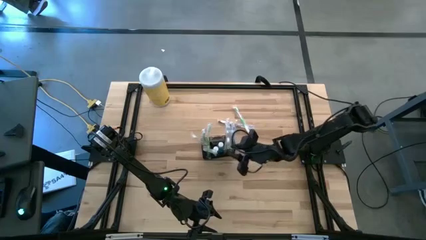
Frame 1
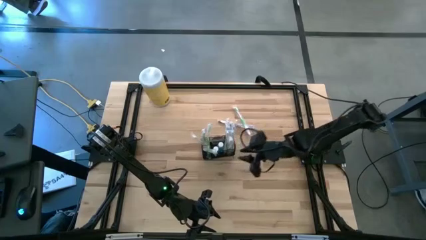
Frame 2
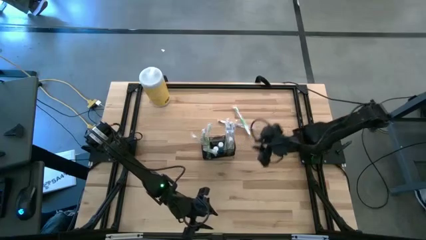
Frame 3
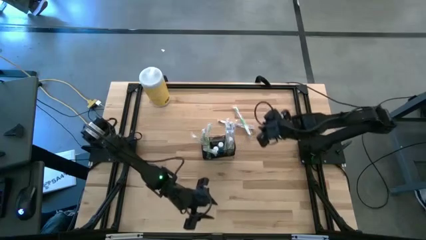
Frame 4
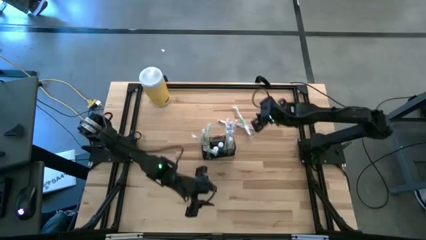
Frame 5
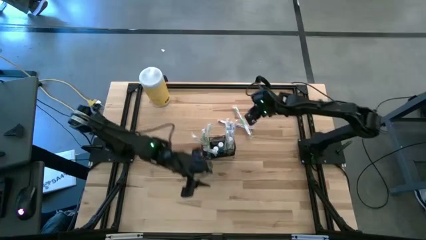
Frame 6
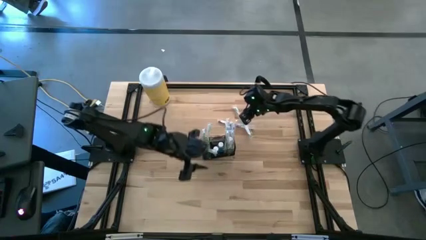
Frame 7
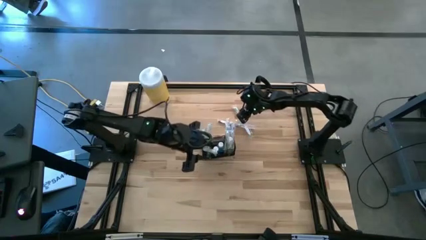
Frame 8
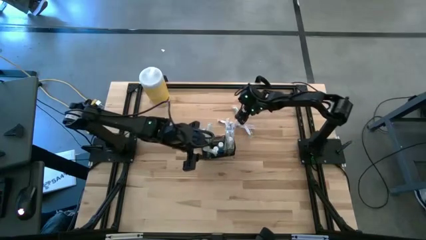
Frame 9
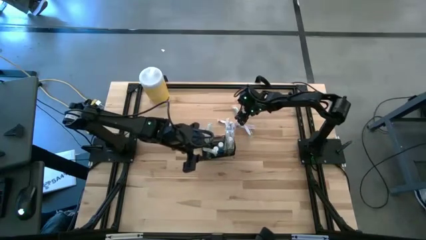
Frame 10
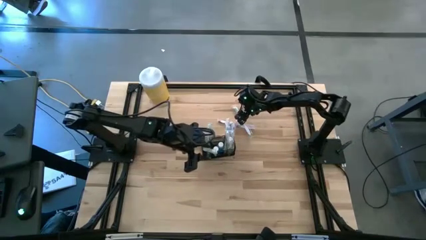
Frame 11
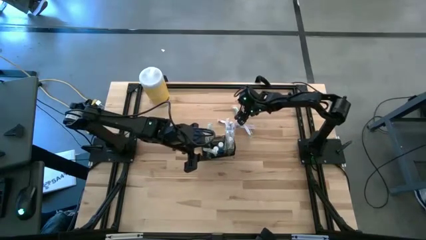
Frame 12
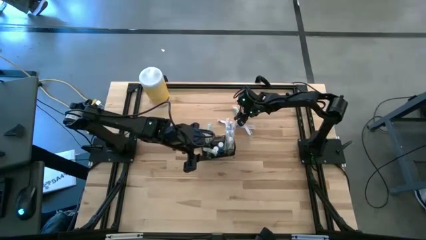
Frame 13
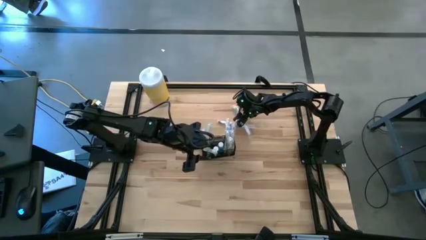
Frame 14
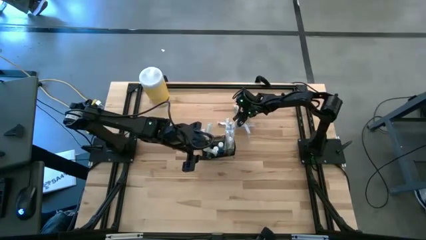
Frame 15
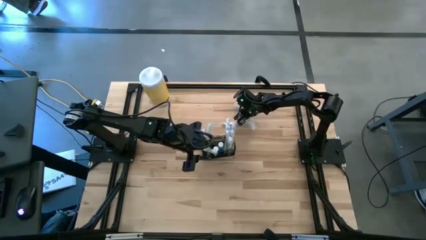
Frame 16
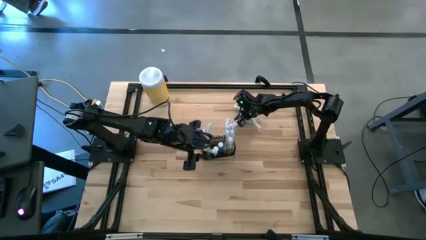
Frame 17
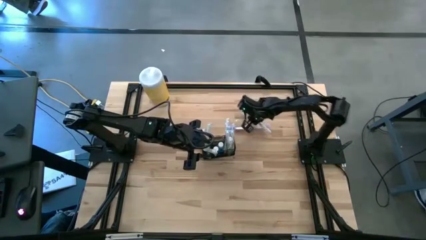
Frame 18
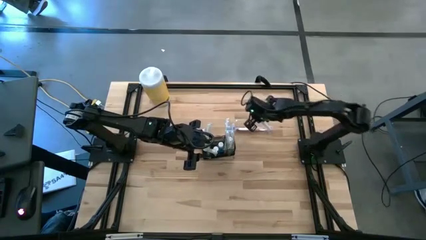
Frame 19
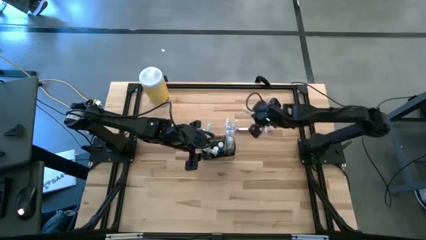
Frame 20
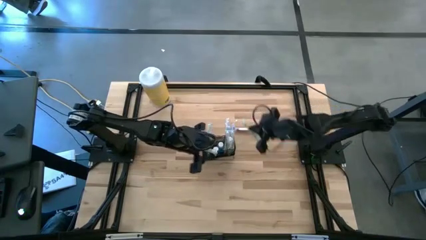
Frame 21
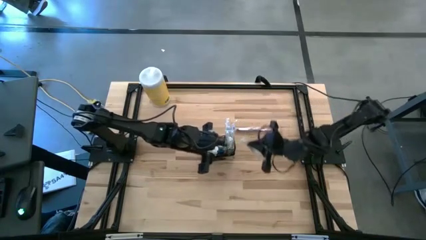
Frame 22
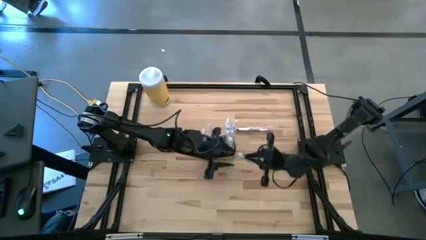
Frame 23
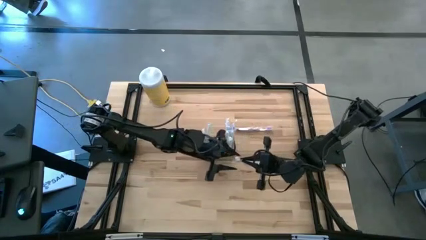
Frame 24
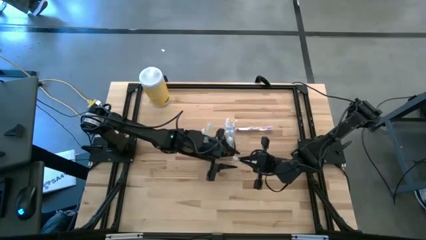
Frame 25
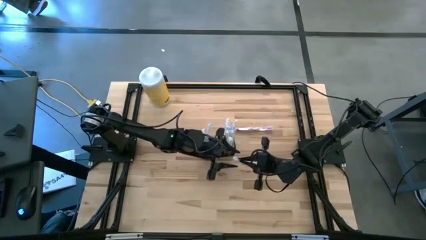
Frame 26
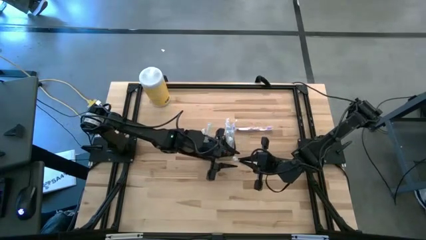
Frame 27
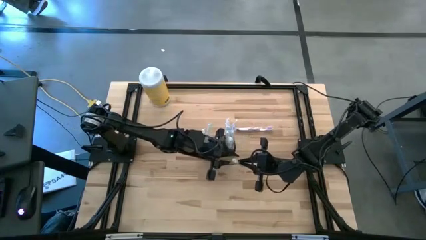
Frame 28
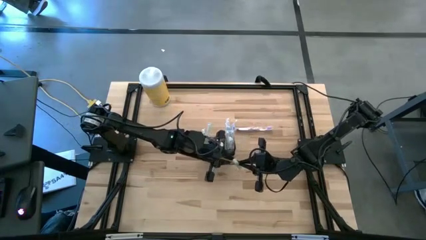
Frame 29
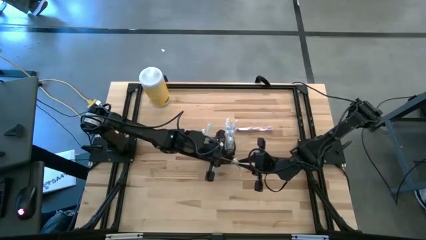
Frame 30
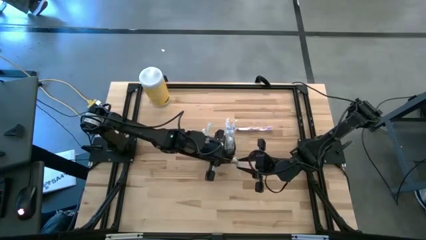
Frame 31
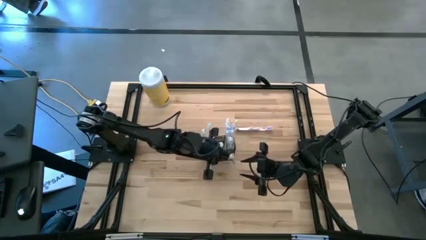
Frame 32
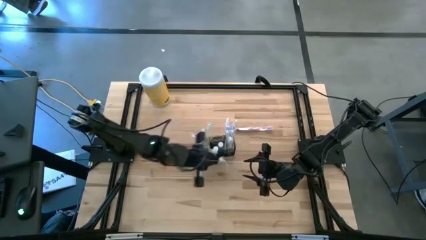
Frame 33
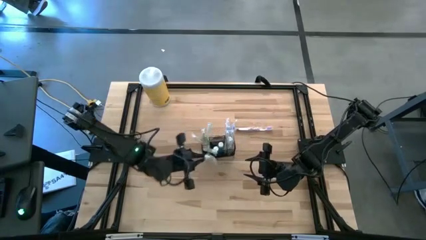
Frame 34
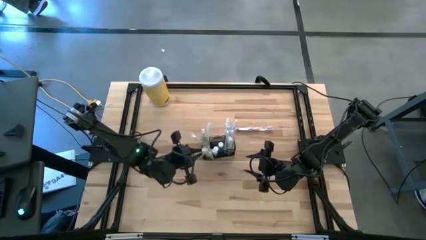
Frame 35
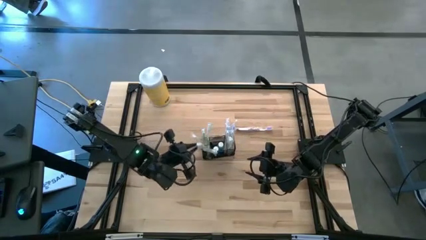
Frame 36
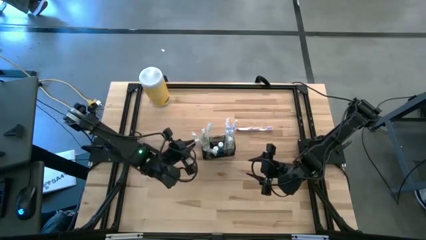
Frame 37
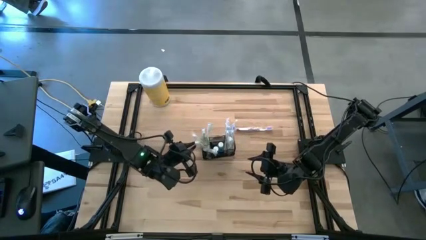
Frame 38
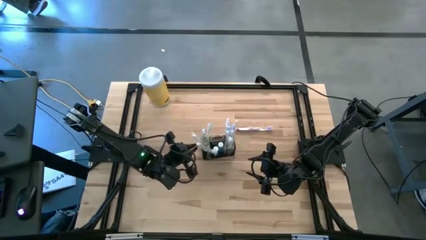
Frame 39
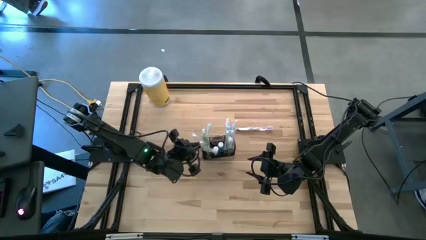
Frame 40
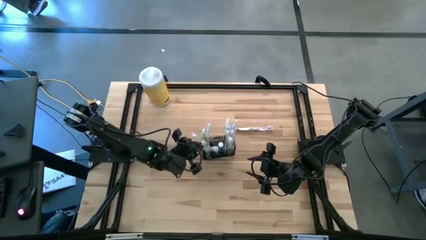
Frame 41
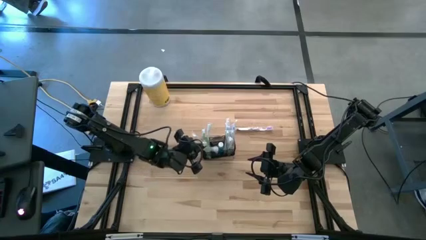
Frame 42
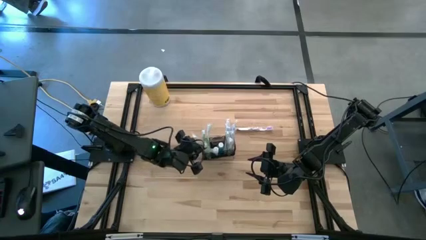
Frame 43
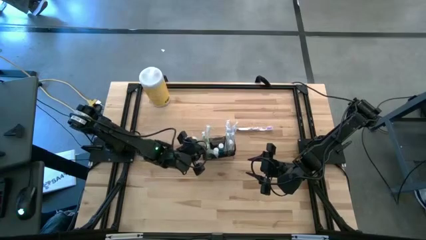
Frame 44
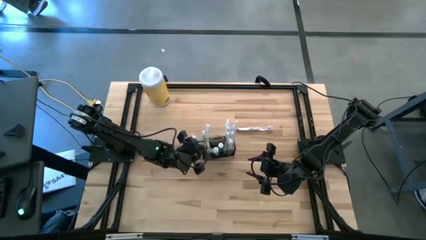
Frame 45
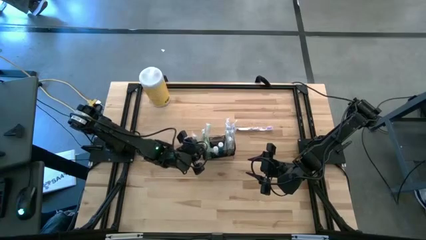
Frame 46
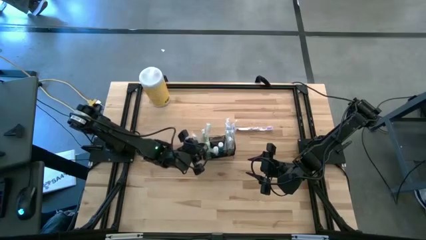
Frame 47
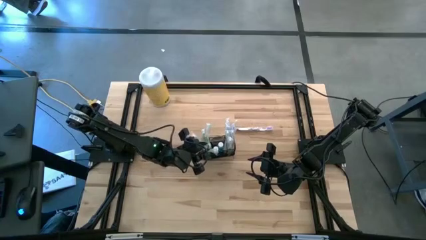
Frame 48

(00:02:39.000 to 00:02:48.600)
Task: Pick & Place toothbrushing station
Put the green toothbrush into the wire organizer

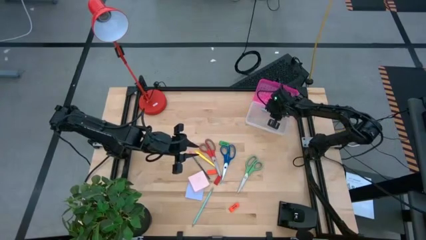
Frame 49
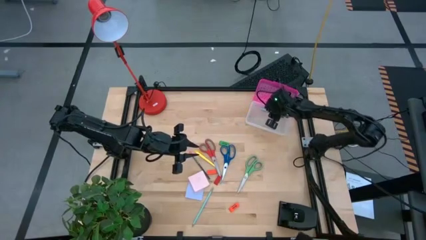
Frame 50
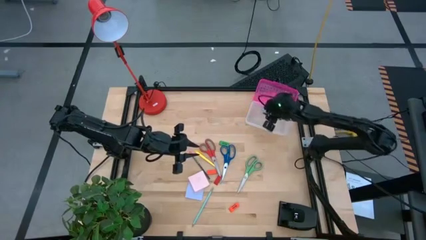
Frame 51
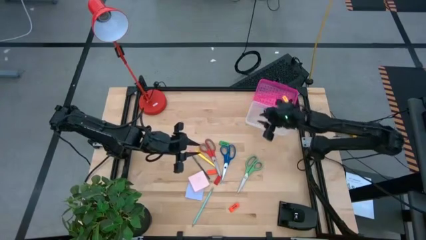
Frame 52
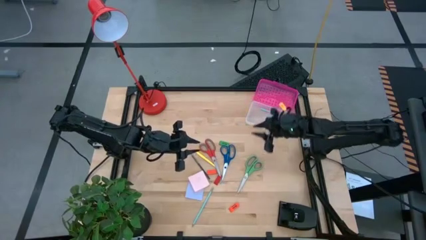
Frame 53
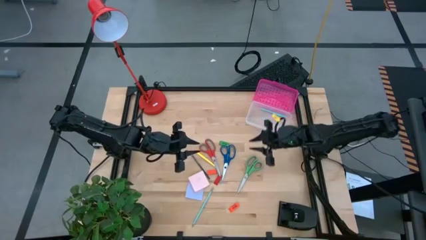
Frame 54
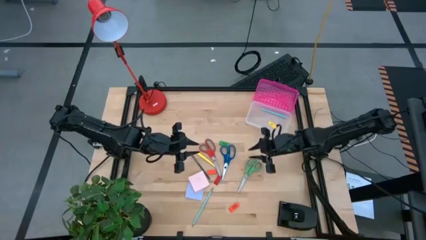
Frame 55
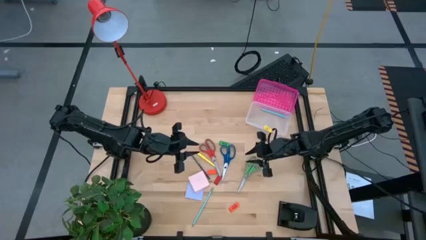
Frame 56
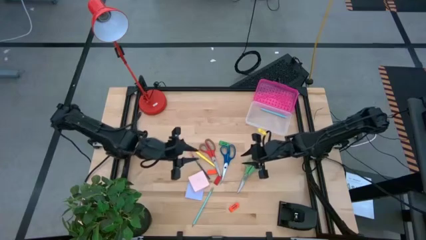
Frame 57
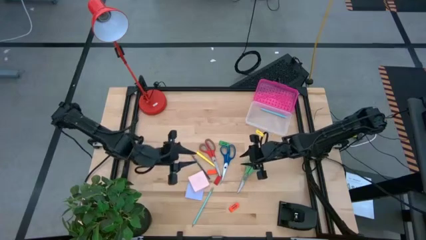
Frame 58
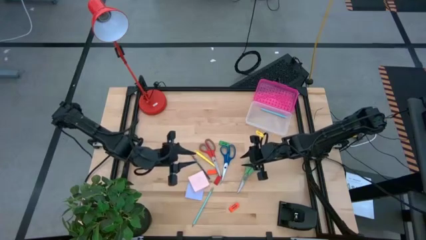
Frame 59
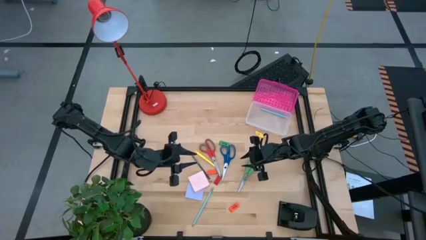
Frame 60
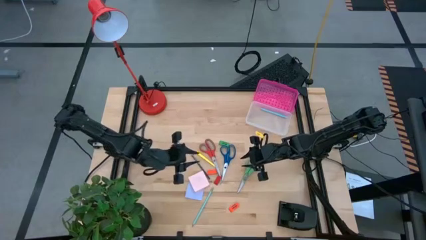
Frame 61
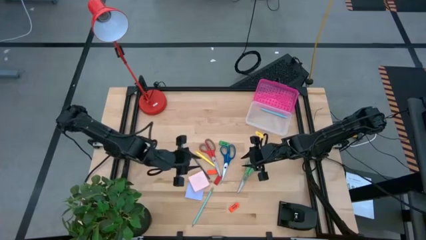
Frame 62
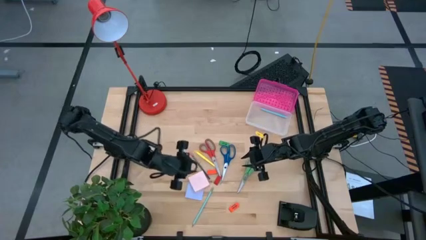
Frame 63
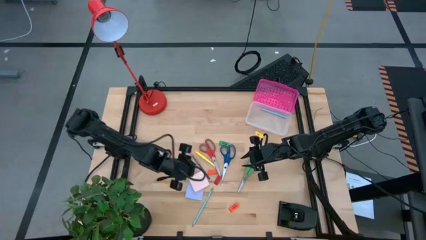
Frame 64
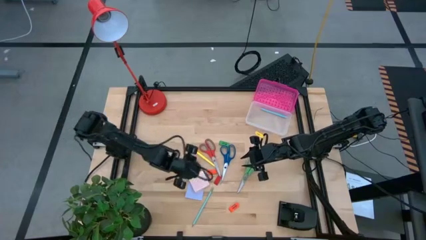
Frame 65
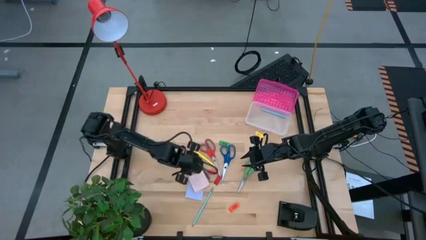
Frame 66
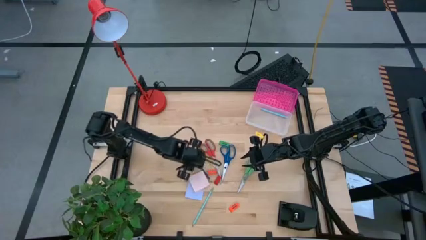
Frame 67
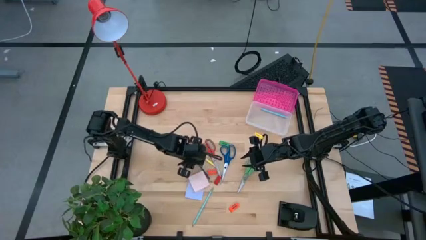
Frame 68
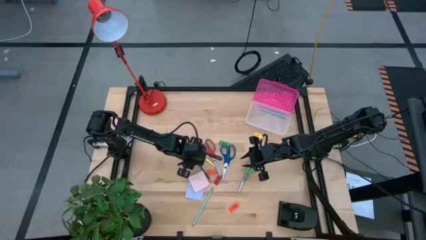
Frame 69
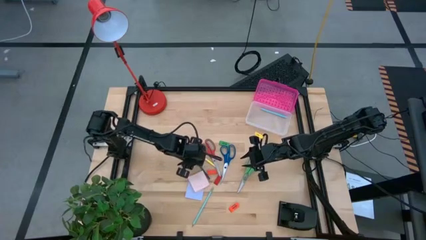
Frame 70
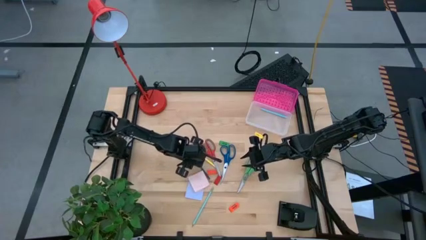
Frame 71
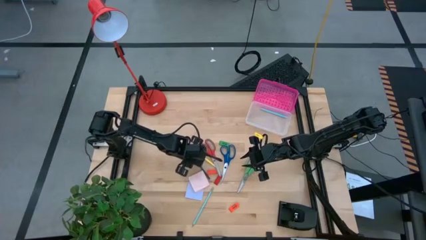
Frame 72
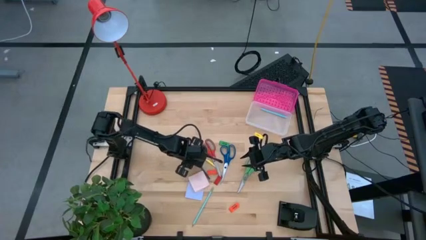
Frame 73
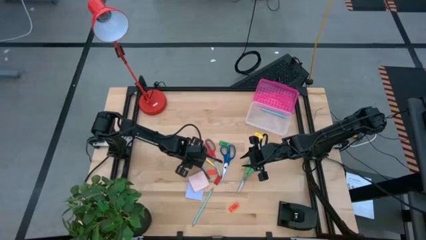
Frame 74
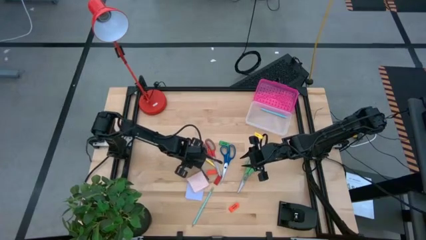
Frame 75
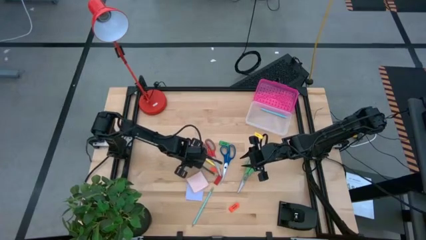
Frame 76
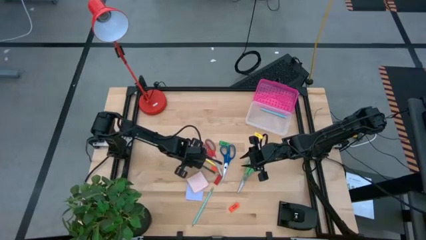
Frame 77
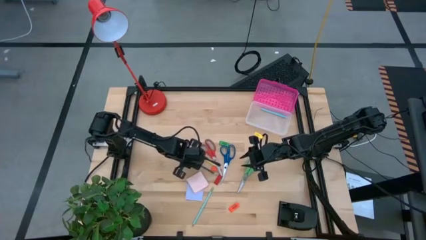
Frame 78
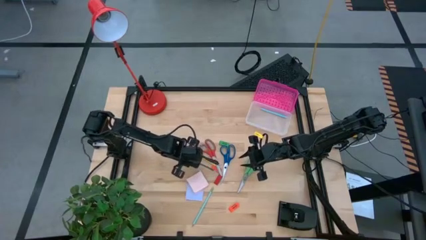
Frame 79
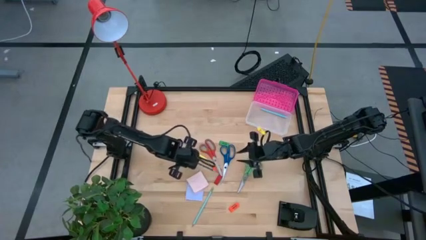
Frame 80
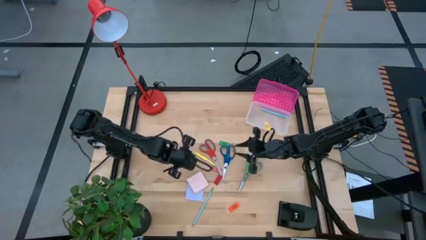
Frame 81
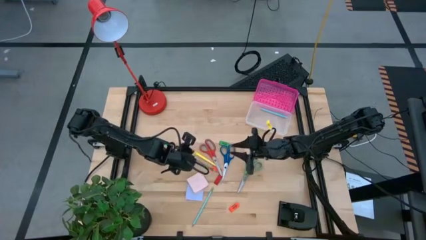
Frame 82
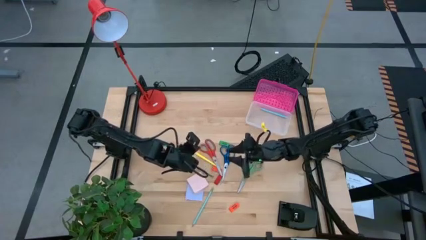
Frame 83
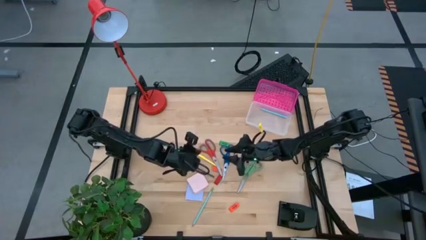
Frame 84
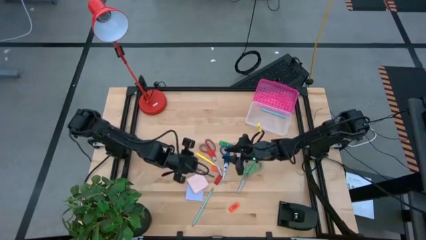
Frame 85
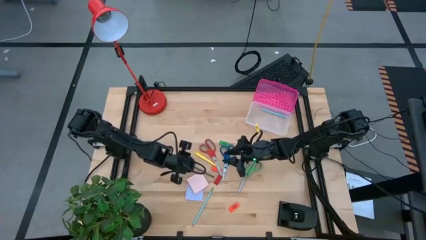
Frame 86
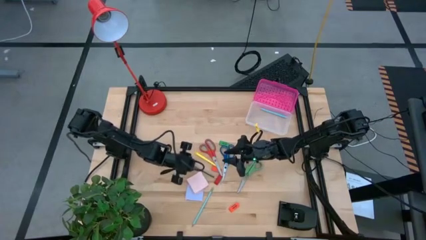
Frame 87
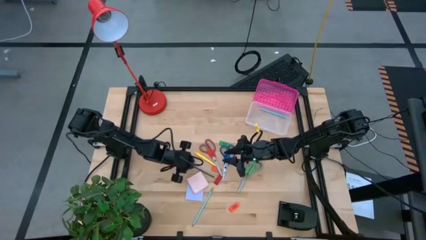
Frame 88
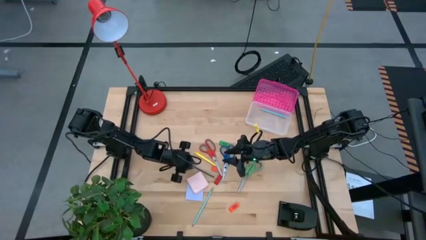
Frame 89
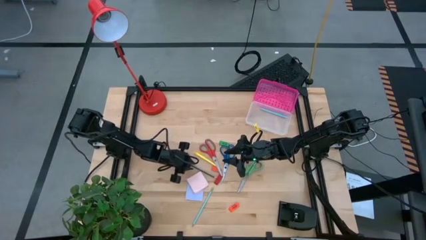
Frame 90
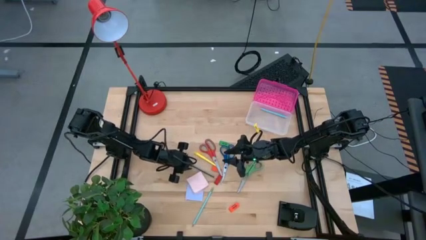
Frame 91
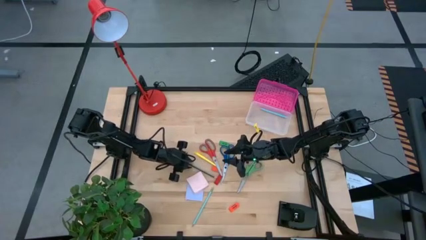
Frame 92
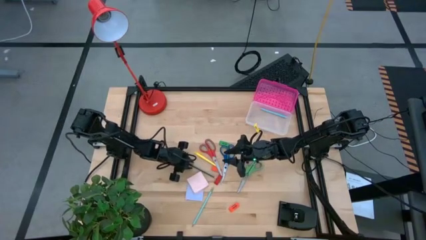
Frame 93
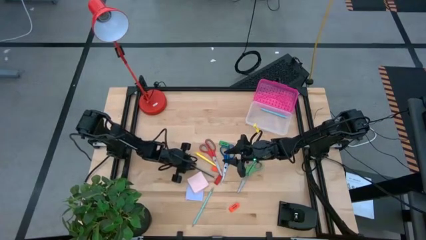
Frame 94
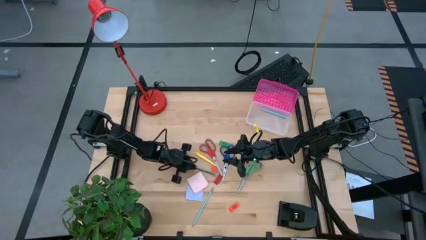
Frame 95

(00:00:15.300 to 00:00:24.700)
Task: Pack school essentials
Put the blue pencil into the supply box
